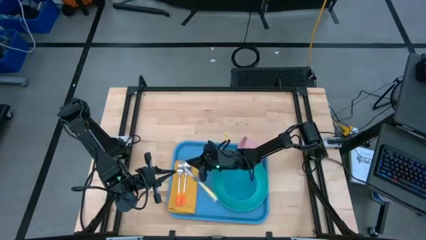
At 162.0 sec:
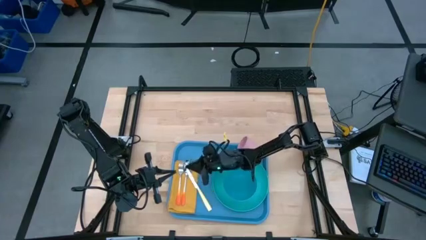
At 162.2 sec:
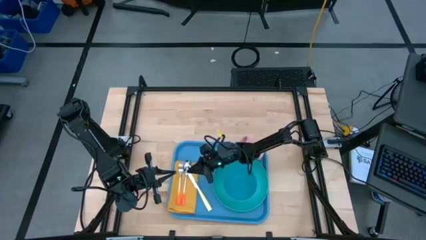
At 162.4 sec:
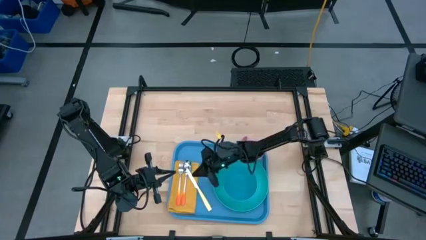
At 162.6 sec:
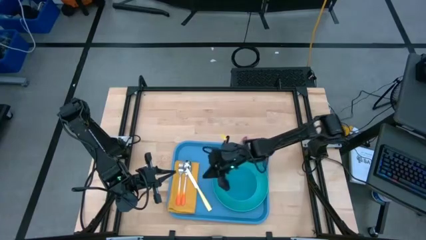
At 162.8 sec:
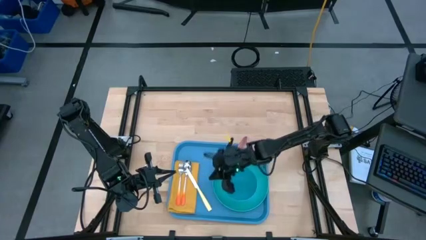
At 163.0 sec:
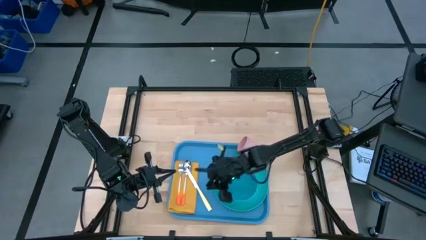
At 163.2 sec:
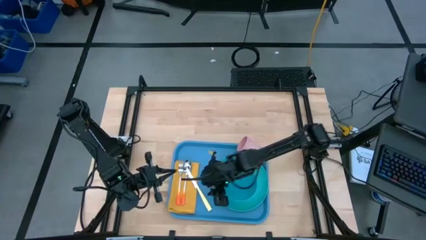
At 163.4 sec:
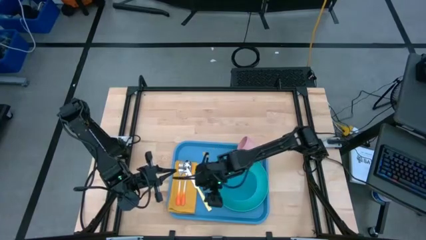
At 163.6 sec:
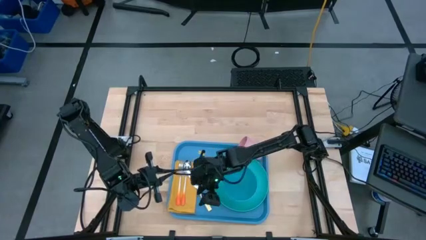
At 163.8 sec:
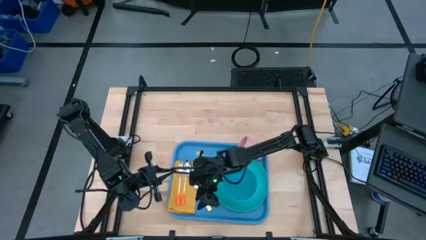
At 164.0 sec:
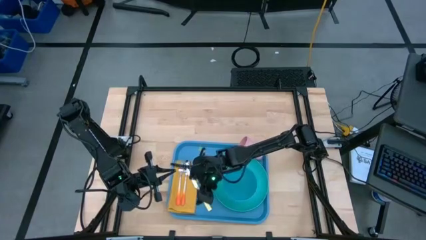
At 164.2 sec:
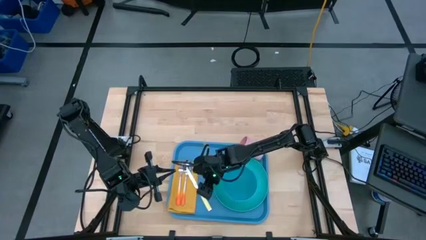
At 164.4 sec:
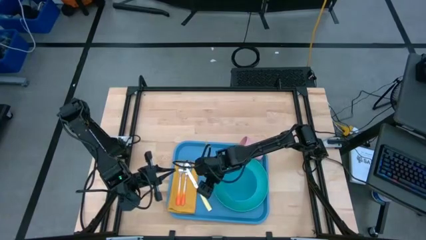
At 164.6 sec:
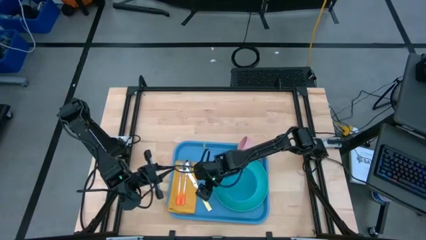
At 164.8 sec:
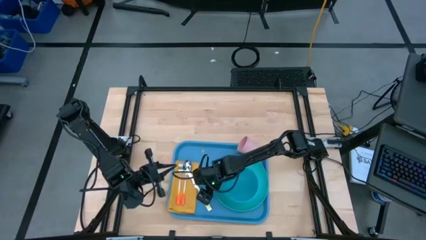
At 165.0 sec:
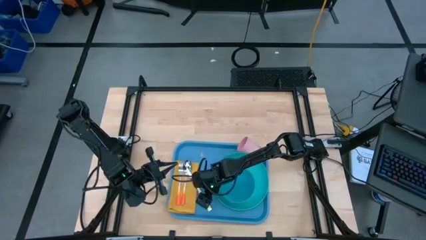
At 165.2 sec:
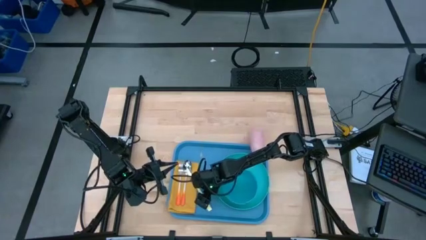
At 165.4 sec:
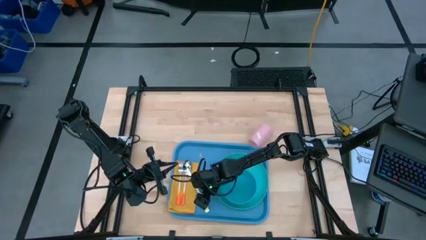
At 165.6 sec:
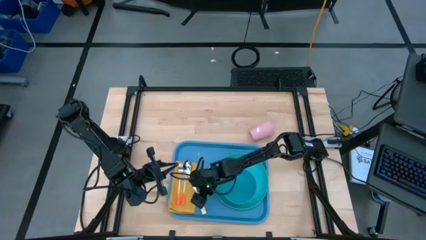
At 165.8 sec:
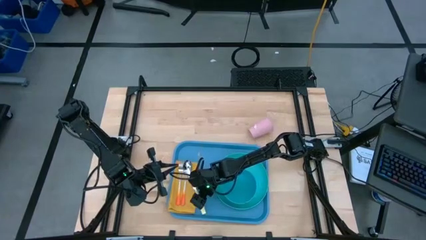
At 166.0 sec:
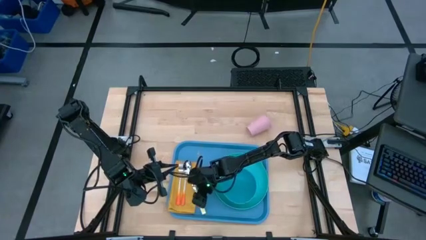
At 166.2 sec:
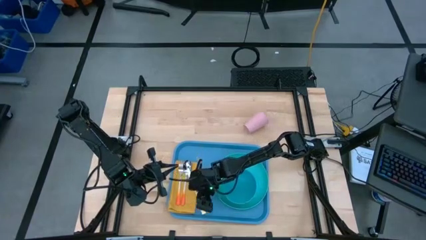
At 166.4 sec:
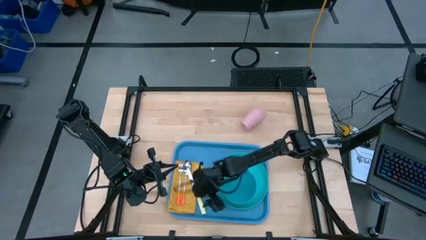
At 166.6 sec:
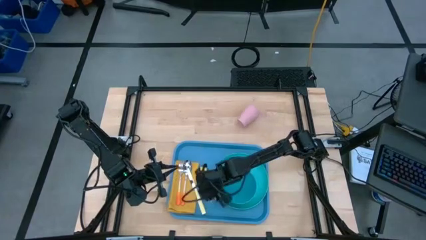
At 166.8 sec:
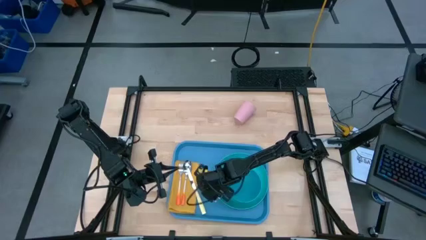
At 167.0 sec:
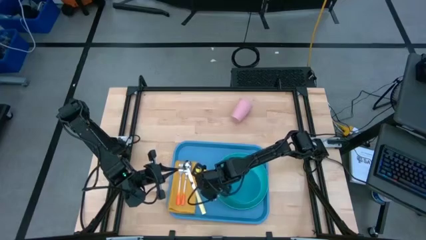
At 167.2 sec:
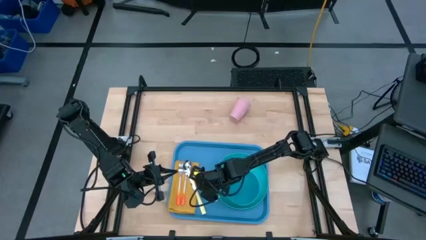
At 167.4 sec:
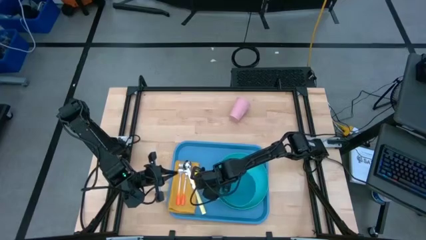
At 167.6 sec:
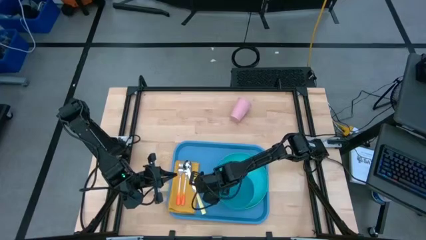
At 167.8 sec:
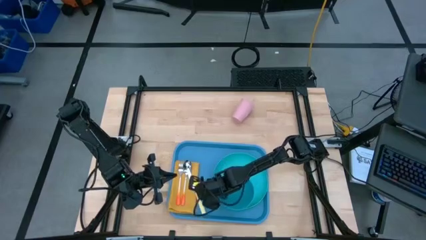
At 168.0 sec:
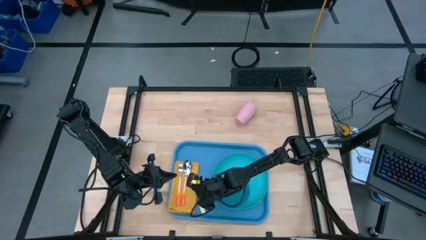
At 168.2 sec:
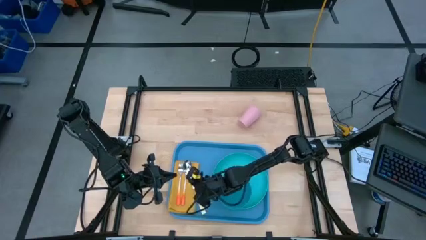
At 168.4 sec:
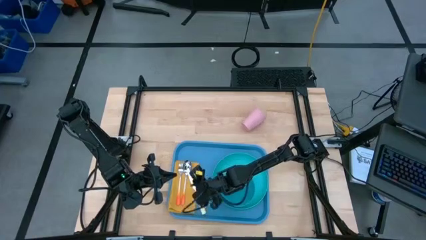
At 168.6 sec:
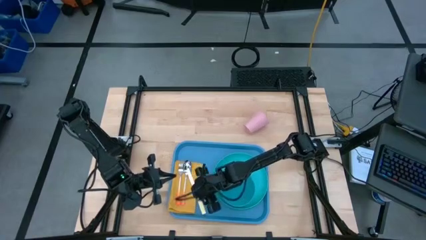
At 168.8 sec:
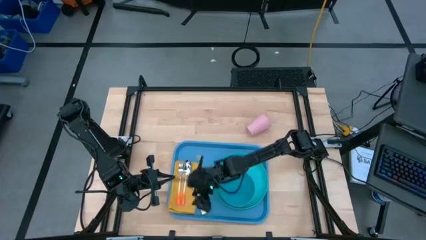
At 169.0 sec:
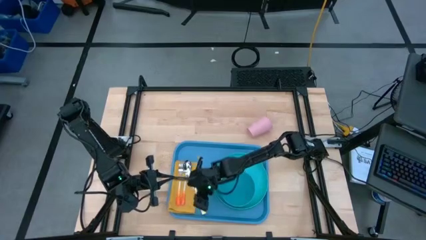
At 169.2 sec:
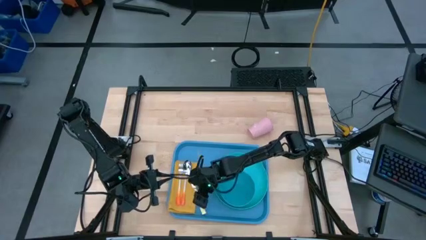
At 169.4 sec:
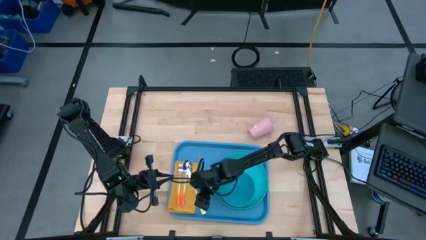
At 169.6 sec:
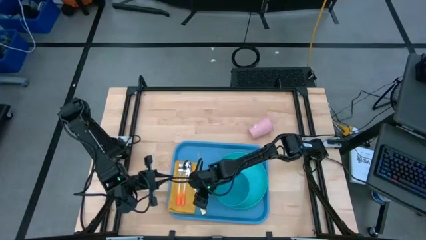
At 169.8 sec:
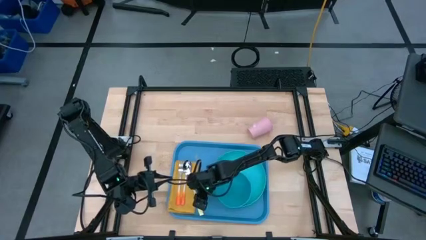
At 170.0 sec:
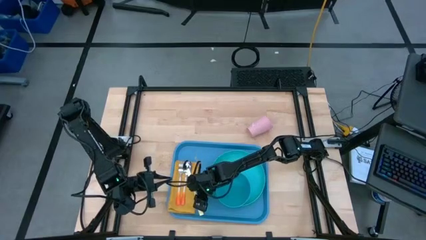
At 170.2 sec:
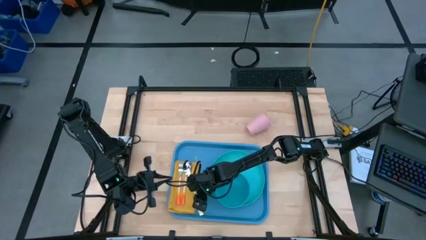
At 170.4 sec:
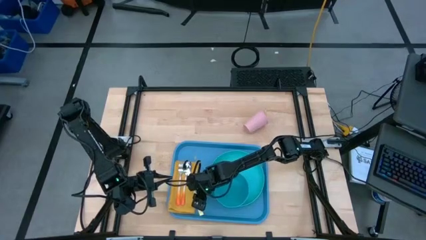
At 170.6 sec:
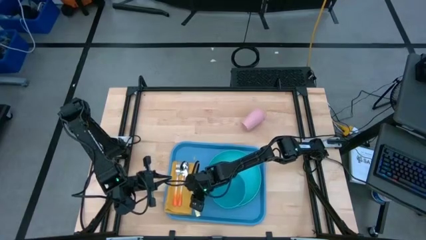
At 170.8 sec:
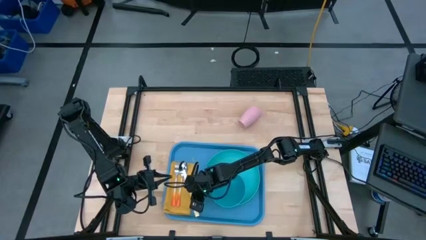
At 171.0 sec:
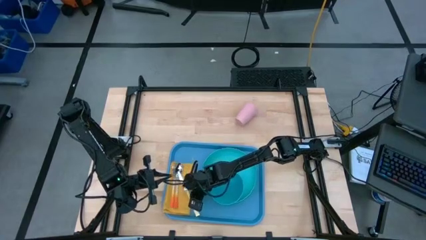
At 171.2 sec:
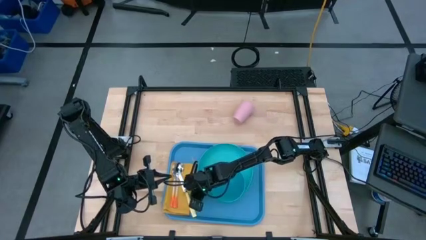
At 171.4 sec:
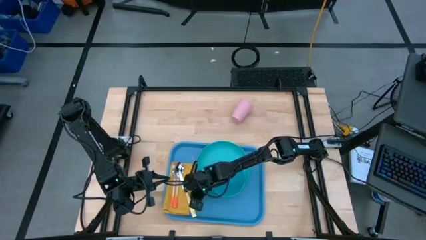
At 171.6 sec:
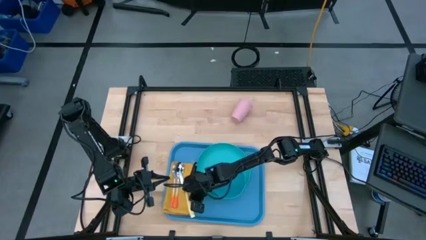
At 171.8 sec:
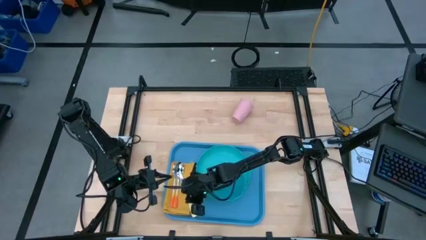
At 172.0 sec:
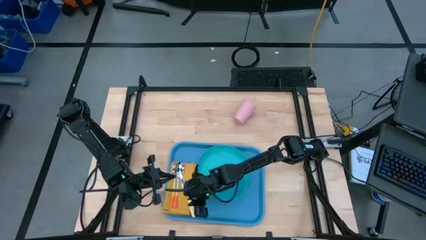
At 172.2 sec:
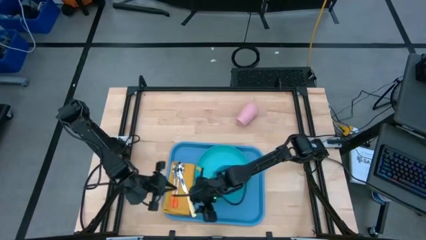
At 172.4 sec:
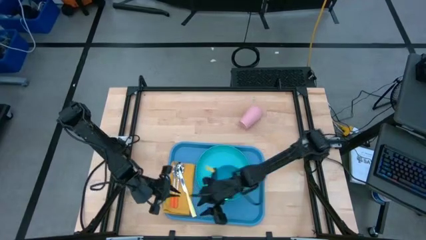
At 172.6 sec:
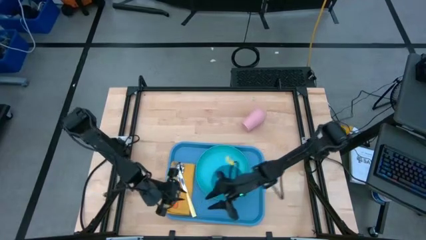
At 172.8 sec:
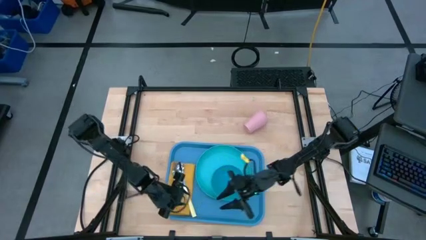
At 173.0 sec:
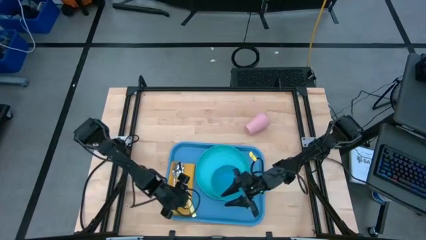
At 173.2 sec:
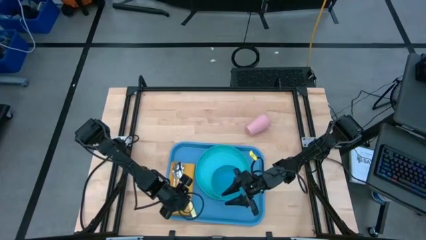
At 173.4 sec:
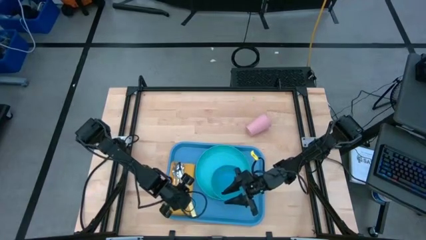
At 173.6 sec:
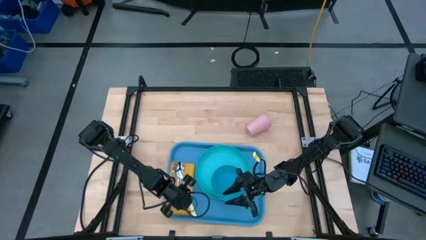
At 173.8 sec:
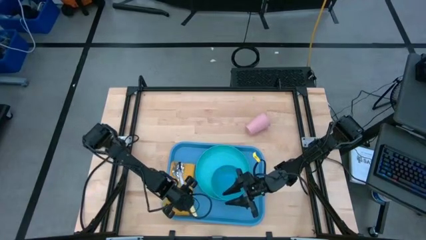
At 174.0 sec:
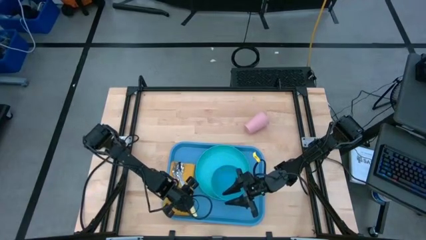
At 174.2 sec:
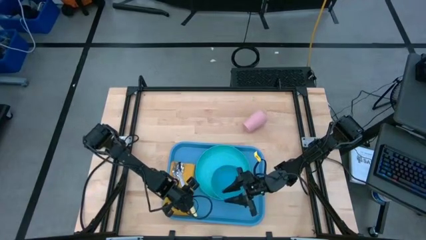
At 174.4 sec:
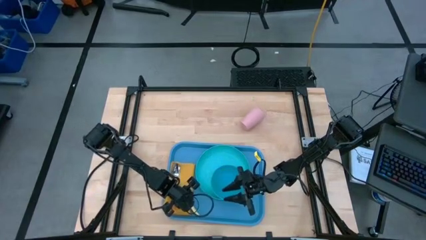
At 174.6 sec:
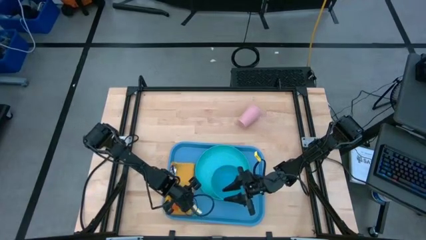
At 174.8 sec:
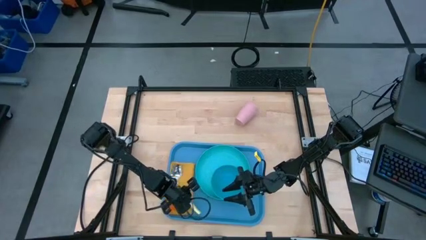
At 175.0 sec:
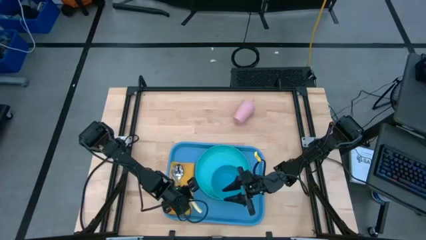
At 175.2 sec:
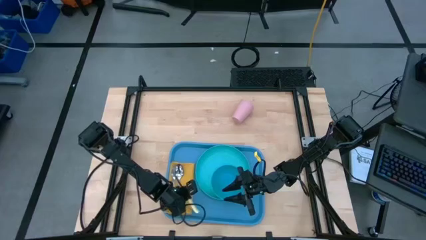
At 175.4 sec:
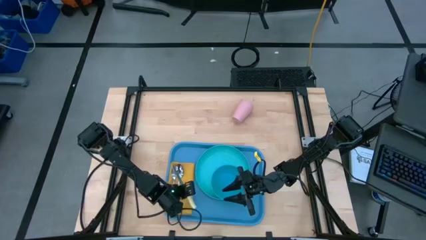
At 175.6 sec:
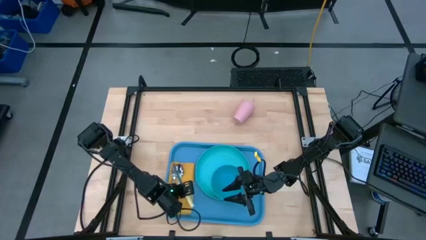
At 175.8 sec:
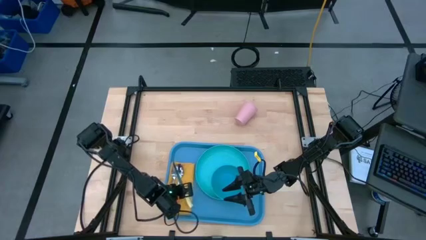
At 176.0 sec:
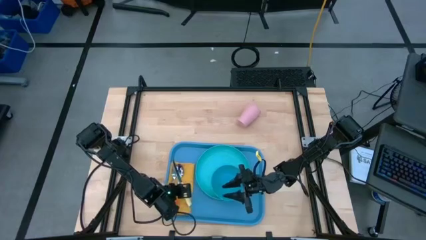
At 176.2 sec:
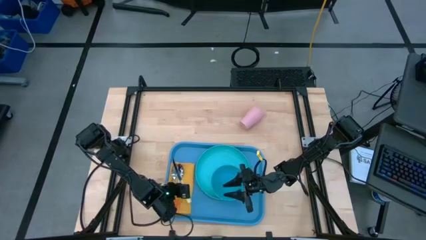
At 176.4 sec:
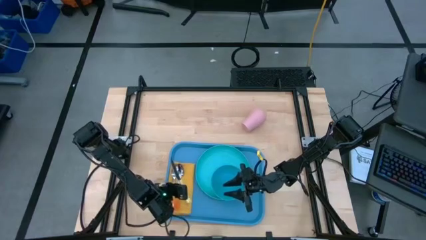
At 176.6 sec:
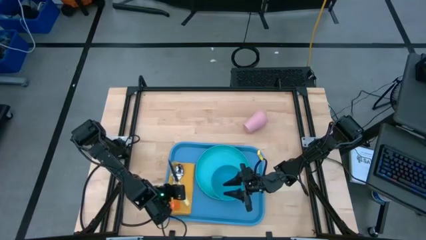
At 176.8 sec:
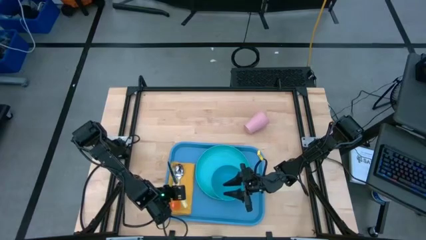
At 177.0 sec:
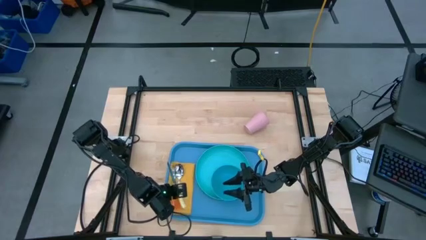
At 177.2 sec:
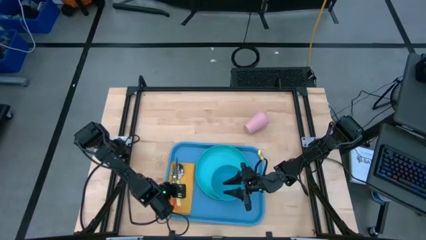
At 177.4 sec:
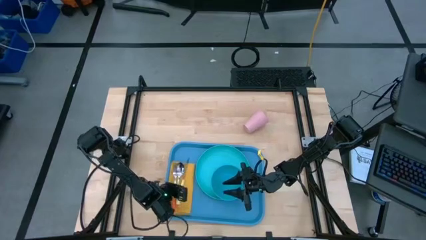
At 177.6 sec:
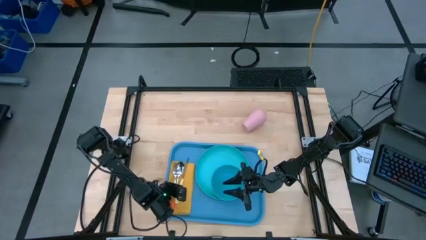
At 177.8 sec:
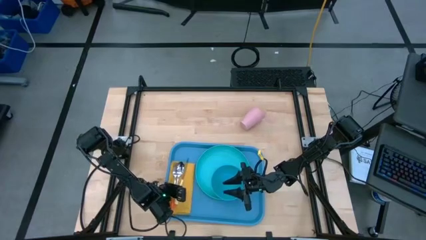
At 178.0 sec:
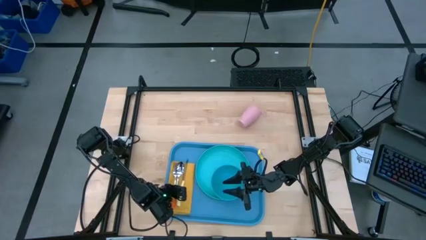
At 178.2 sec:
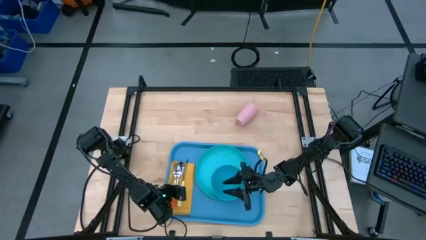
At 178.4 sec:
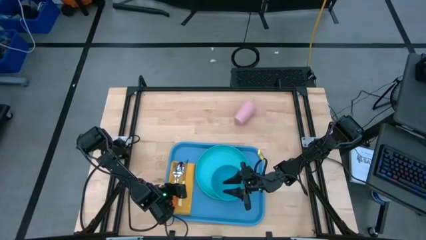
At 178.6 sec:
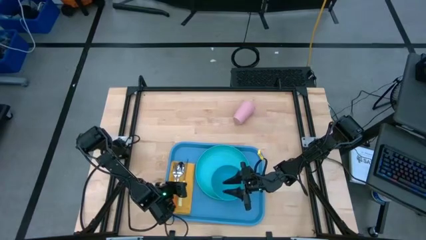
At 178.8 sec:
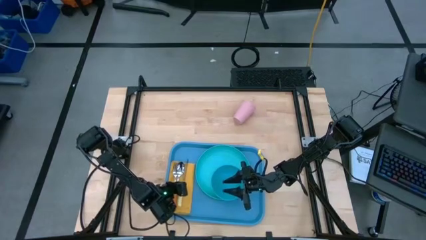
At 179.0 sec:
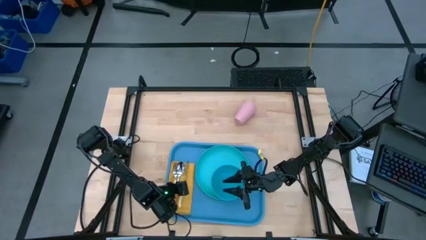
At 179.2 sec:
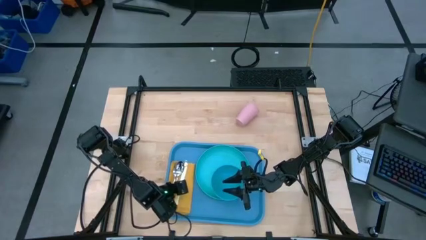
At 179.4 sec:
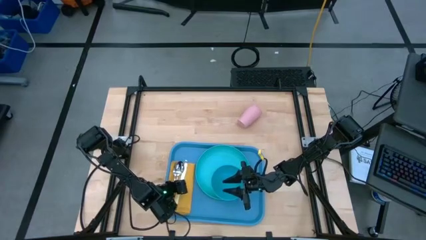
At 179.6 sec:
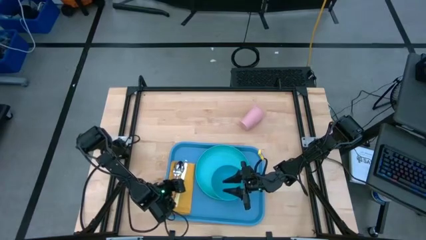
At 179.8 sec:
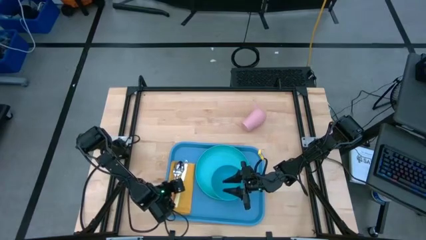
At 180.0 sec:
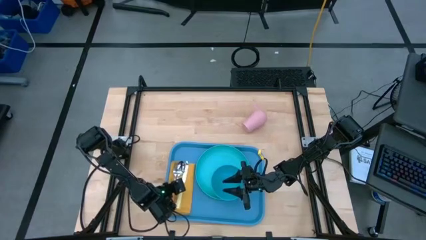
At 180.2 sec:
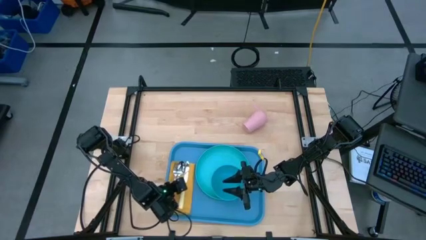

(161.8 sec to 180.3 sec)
Task: Set up tray
Put the yellow table knife on top of the yellow table napkin to the right of the orange spoon
